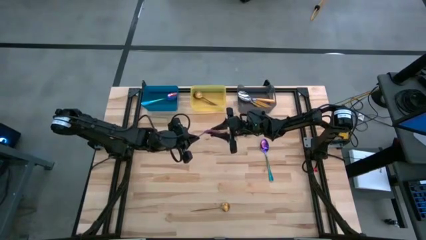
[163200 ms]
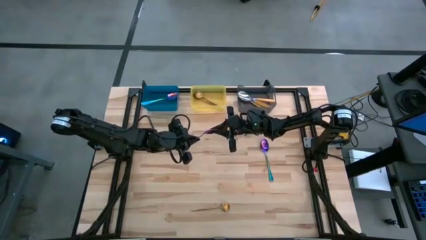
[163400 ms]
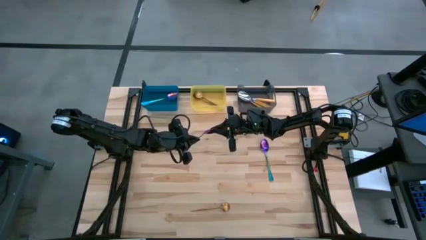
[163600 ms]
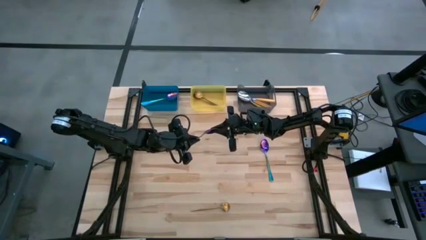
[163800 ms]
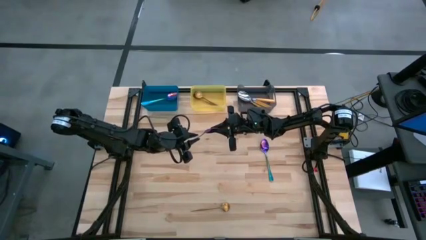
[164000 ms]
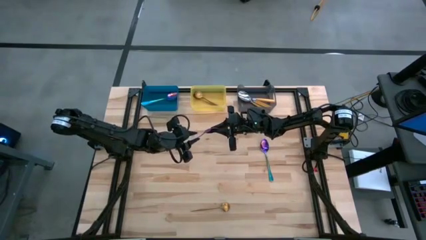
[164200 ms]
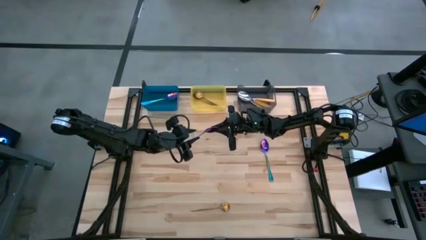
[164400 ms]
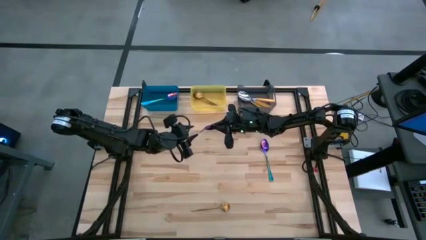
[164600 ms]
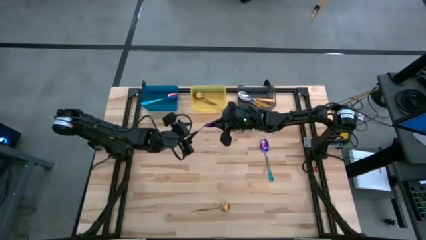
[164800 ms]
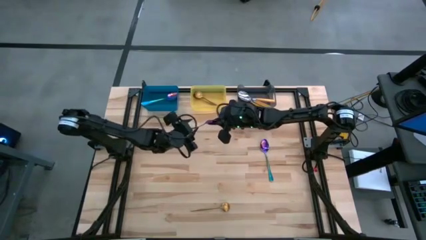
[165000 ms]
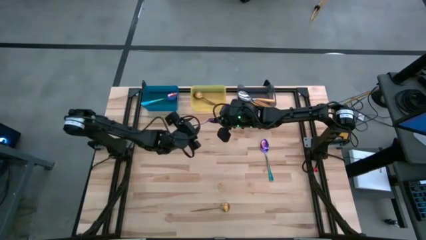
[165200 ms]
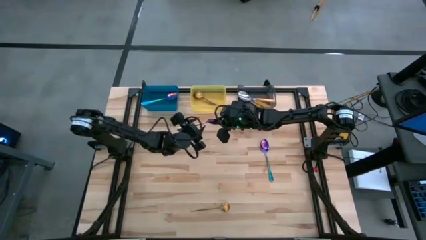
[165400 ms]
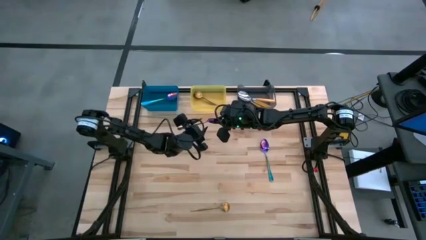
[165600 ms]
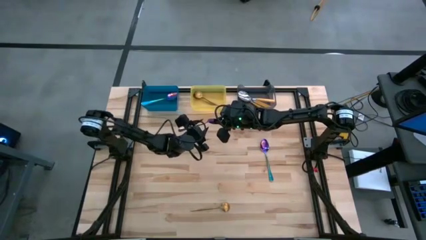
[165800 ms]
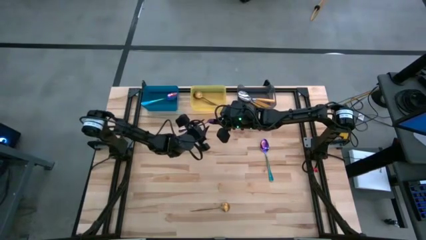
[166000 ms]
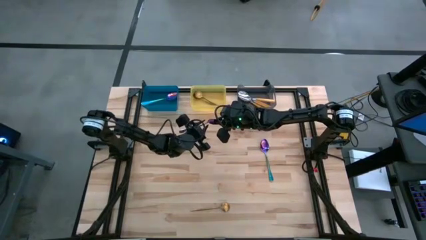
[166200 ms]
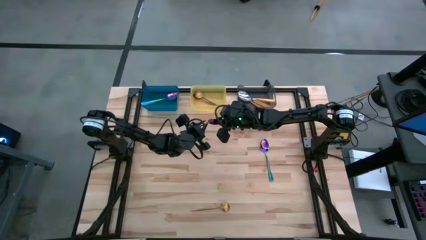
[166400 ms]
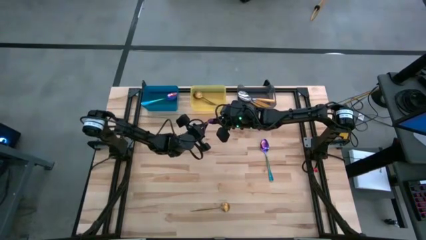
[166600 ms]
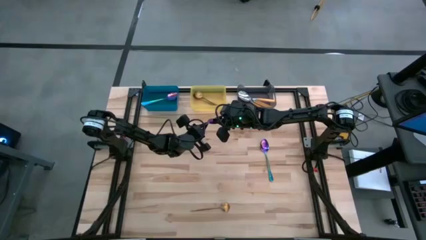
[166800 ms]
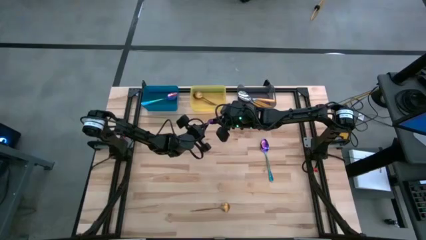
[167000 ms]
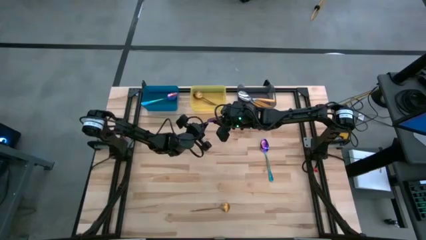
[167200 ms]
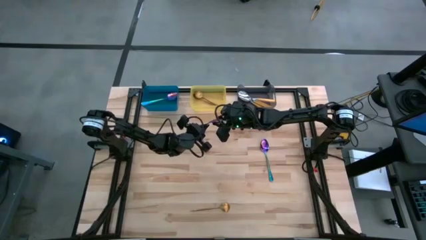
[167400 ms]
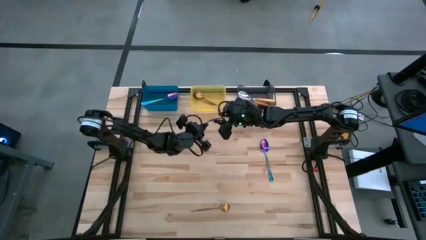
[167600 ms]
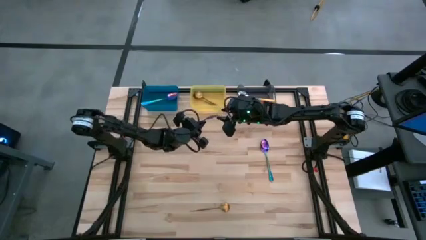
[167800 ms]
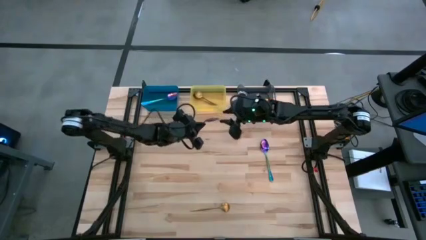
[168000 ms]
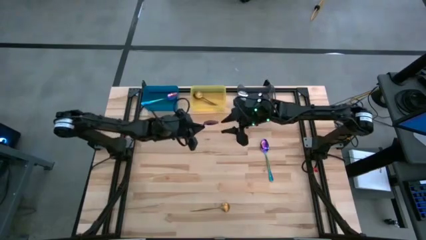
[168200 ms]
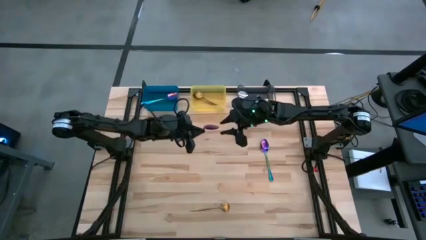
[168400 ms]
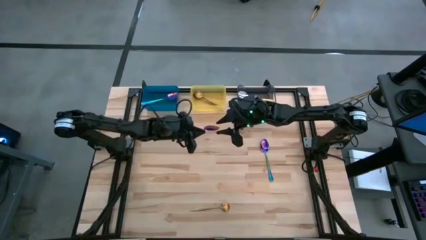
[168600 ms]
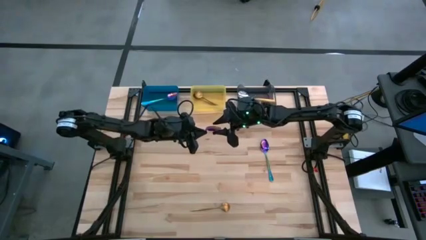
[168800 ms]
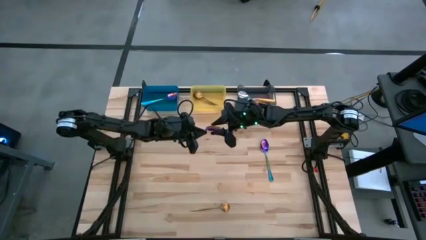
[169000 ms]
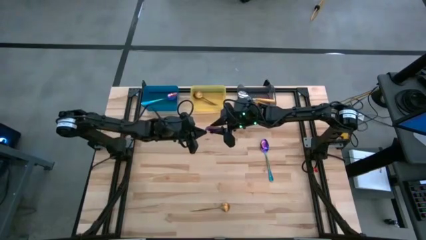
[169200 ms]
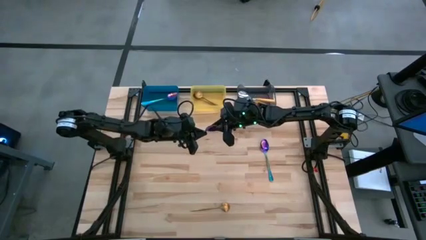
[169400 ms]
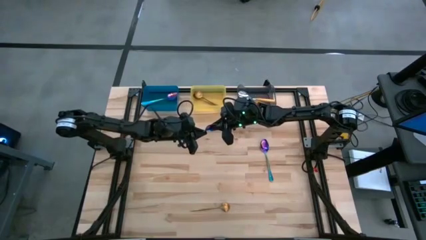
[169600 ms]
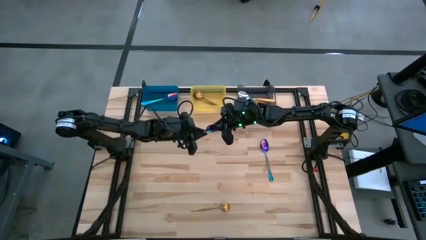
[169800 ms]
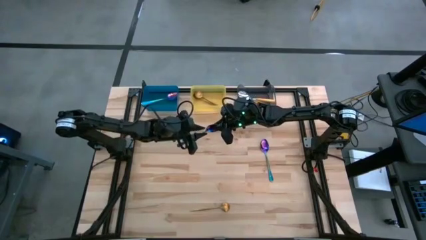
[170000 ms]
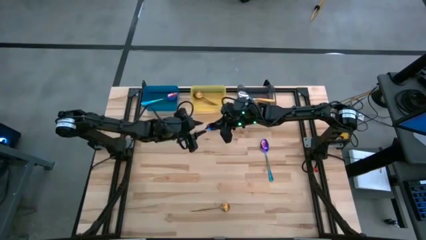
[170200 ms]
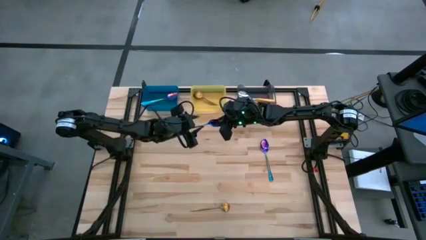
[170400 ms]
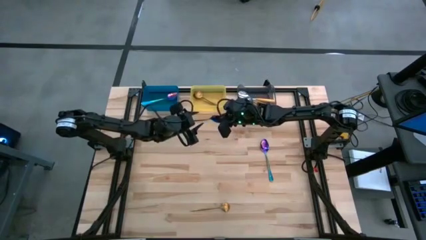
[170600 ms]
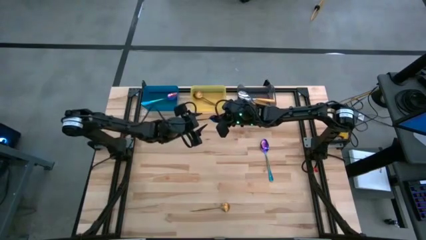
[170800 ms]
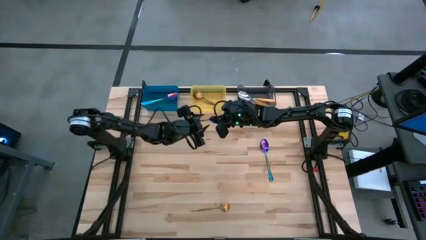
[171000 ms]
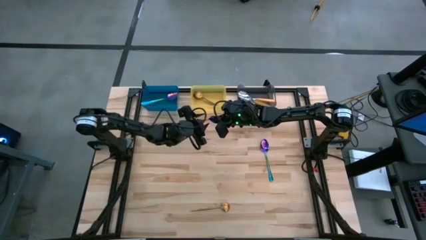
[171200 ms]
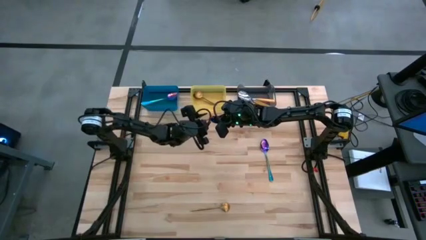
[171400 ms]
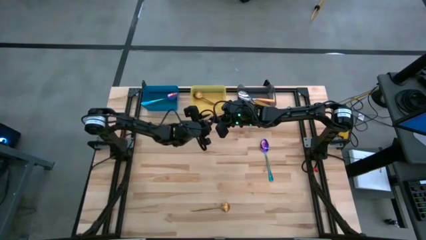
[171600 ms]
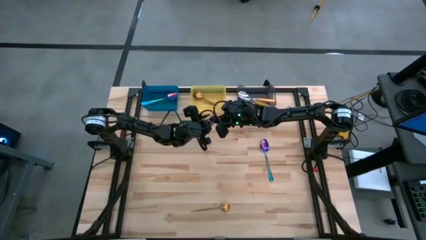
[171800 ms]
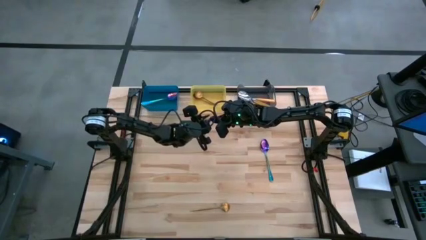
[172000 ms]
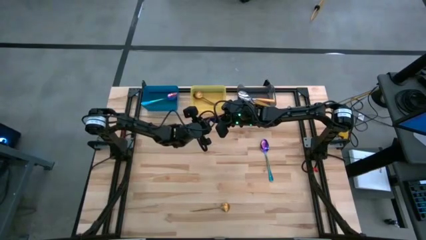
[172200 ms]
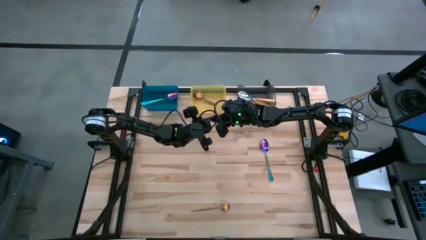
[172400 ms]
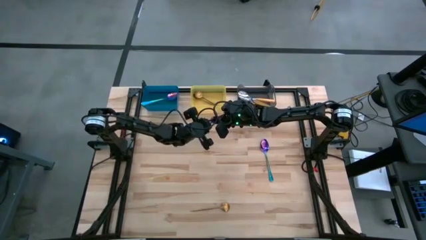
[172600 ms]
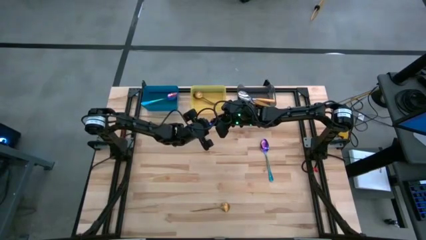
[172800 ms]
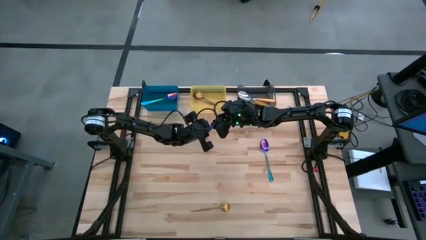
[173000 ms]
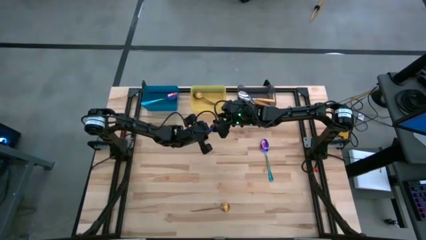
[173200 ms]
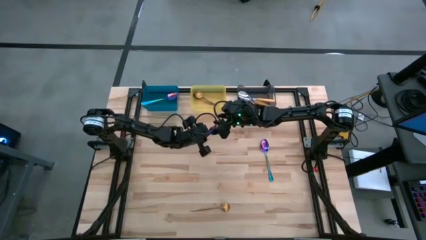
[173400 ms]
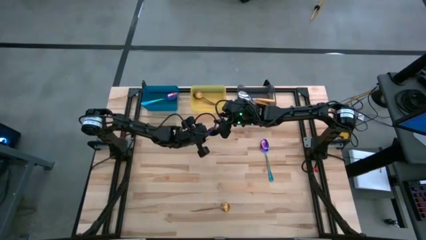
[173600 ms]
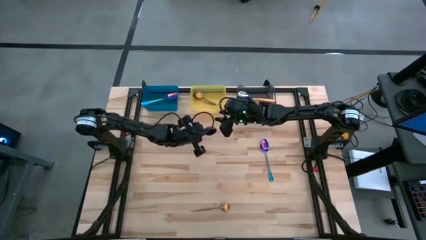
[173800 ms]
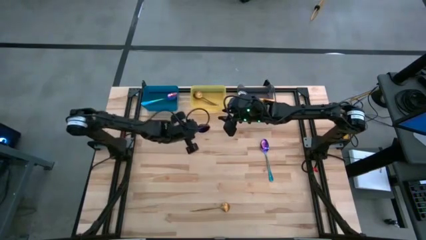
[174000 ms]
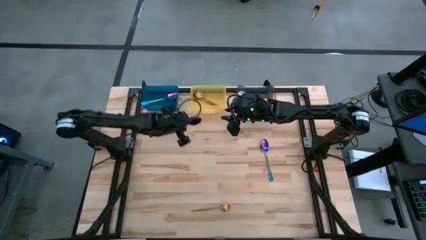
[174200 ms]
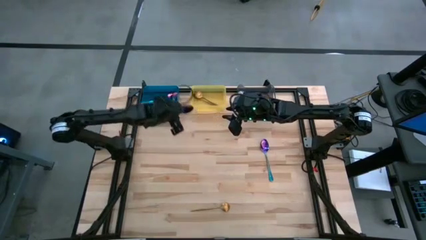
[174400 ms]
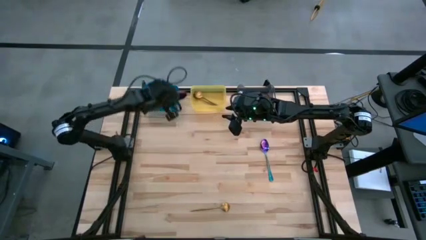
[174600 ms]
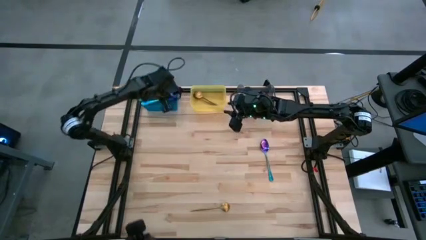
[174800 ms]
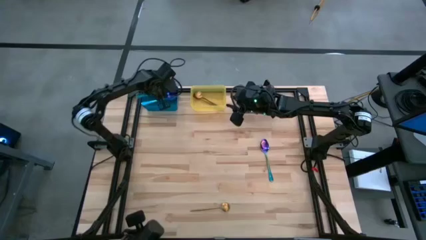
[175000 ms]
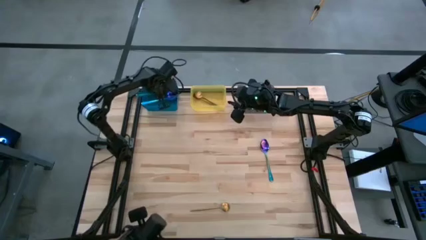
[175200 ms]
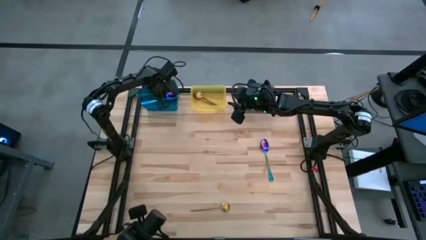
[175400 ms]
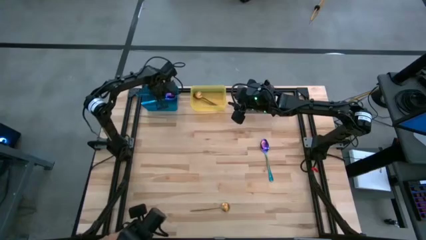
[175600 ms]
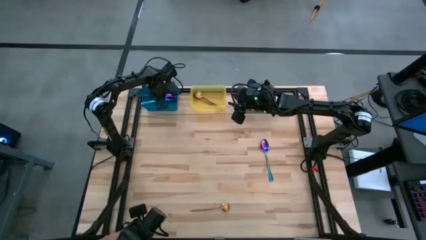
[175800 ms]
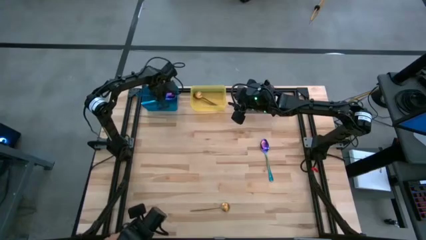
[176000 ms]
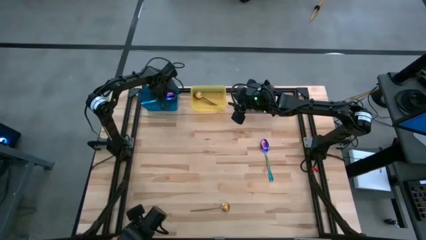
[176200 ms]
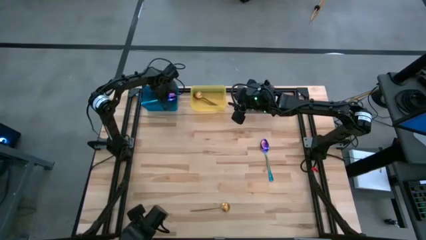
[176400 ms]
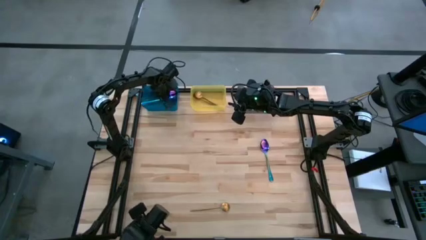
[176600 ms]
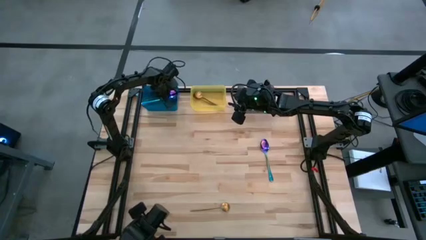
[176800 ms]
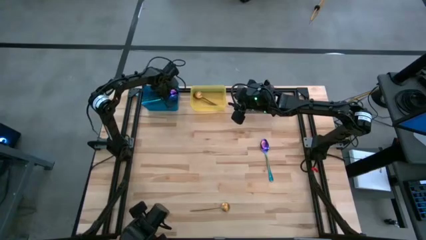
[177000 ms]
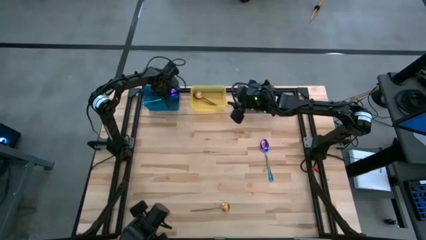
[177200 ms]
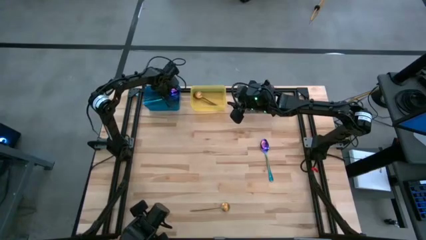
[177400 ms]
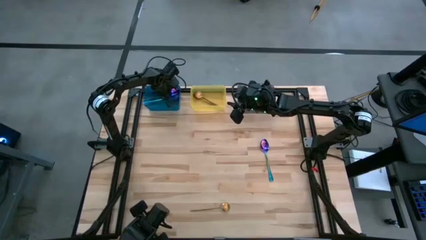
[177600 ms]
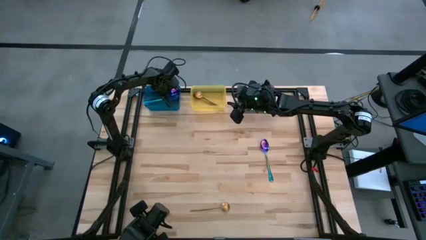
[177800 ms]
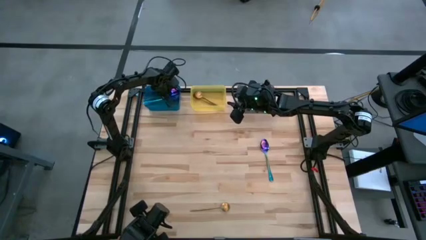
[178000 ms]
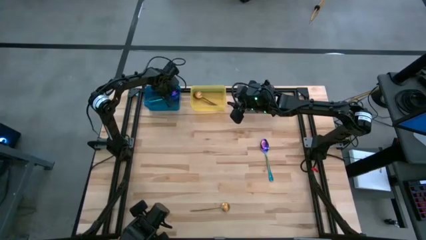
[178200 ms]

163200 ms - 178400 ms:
Task: Sort silverware by color (type)
Put the blue spoon into the blue bin
